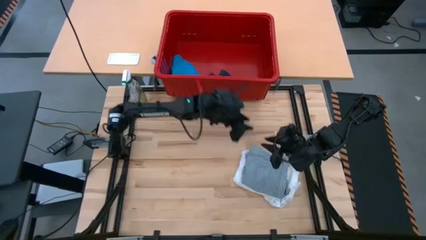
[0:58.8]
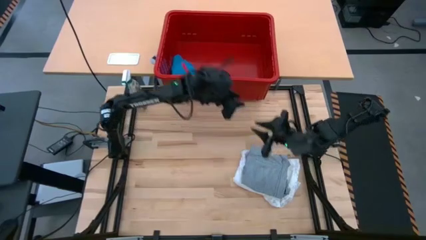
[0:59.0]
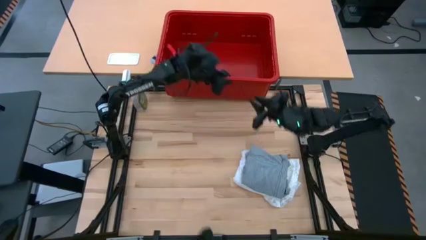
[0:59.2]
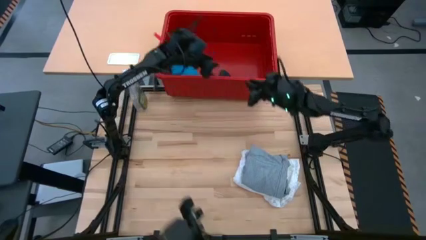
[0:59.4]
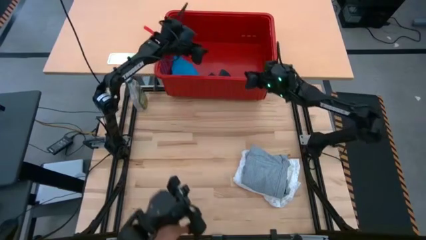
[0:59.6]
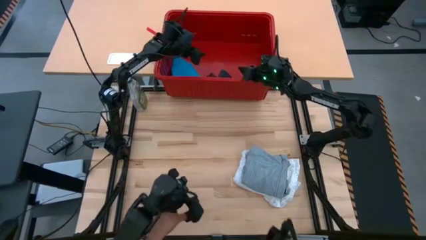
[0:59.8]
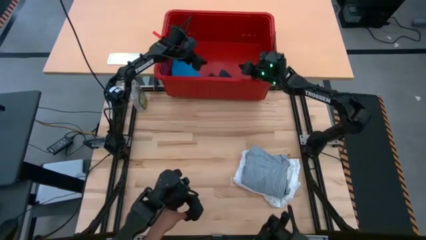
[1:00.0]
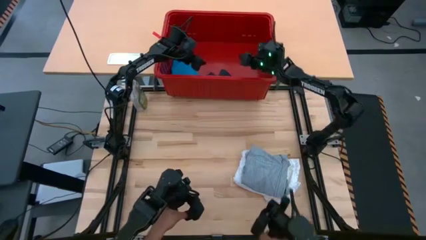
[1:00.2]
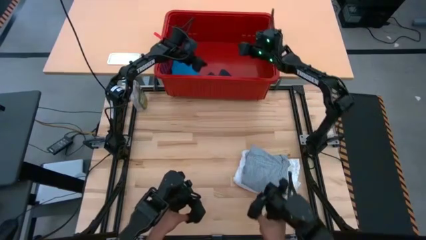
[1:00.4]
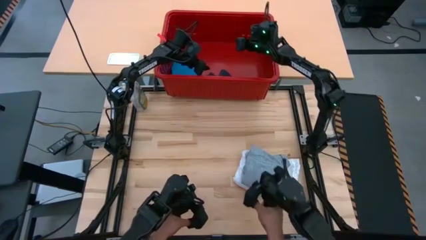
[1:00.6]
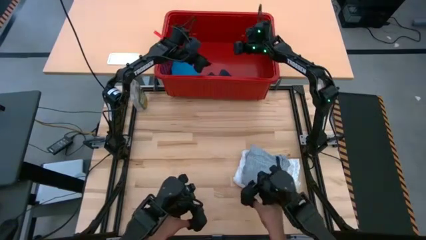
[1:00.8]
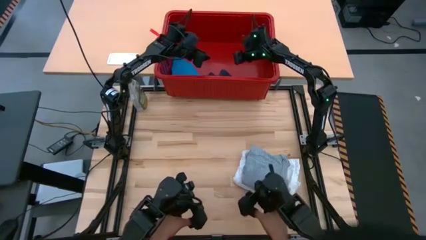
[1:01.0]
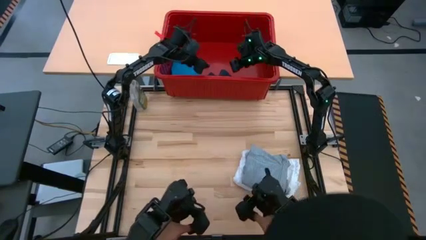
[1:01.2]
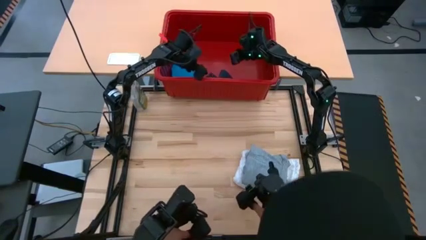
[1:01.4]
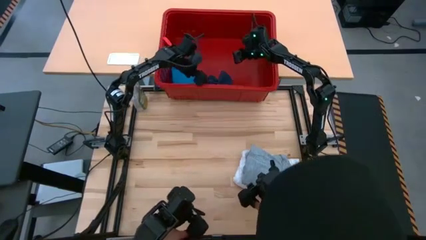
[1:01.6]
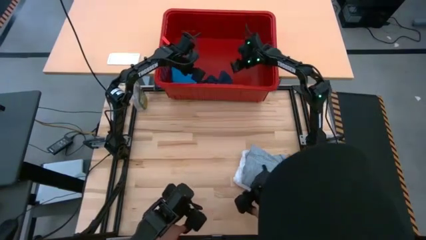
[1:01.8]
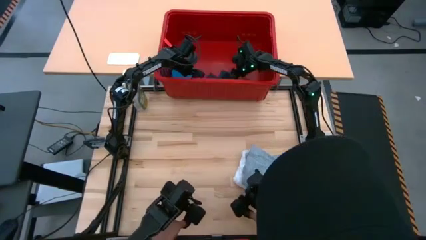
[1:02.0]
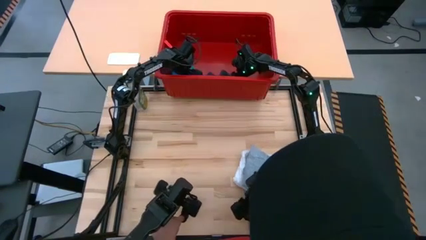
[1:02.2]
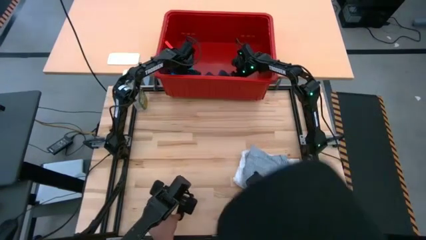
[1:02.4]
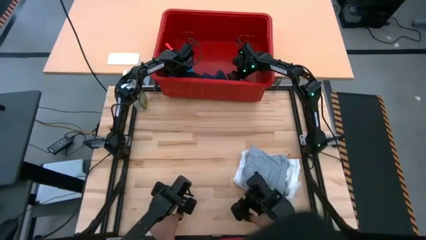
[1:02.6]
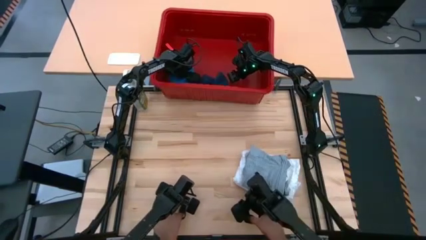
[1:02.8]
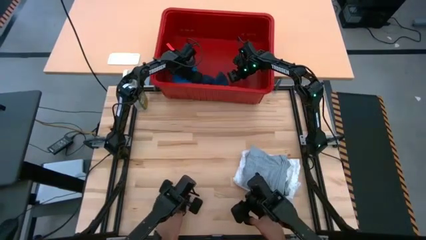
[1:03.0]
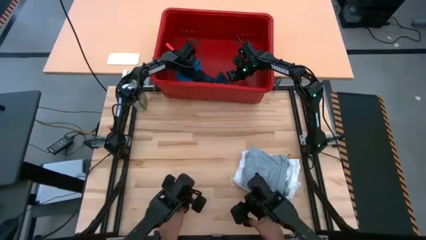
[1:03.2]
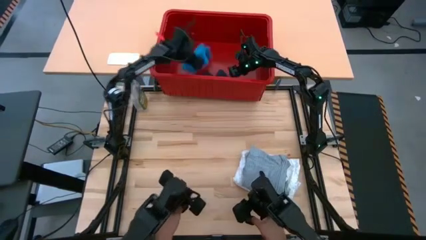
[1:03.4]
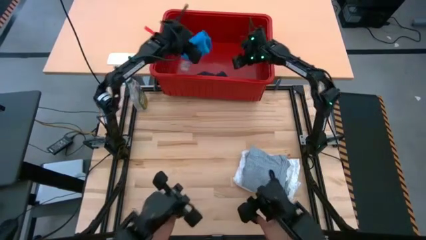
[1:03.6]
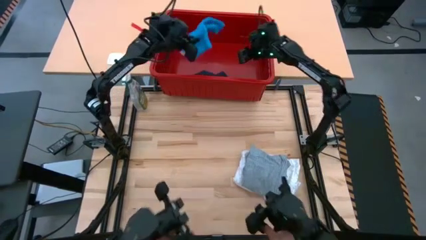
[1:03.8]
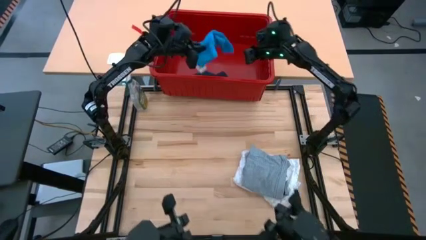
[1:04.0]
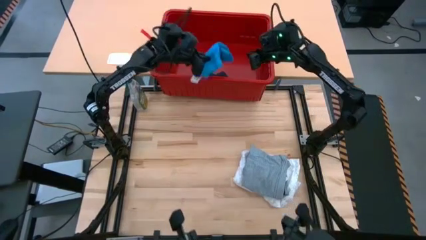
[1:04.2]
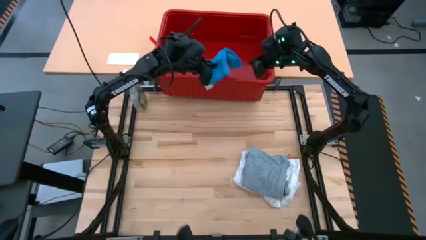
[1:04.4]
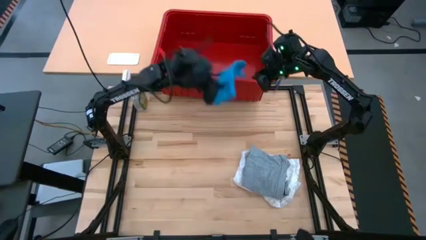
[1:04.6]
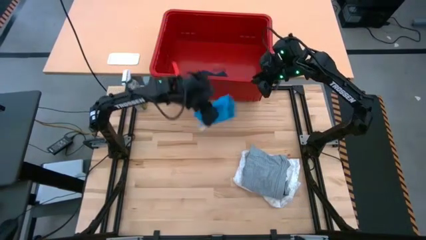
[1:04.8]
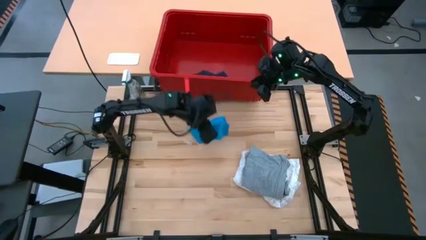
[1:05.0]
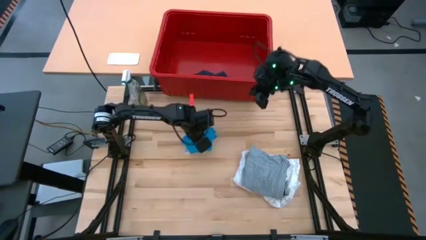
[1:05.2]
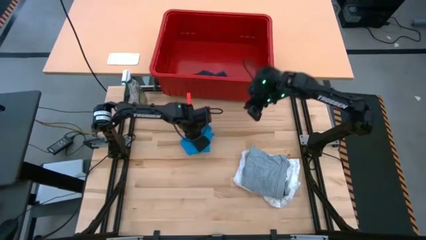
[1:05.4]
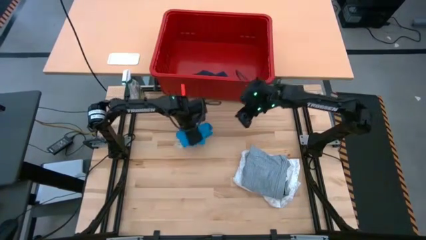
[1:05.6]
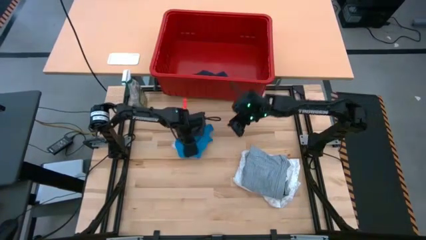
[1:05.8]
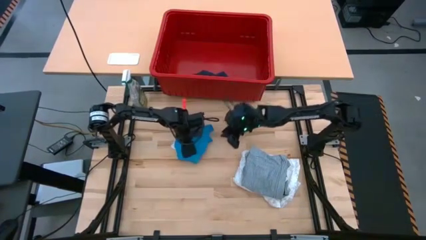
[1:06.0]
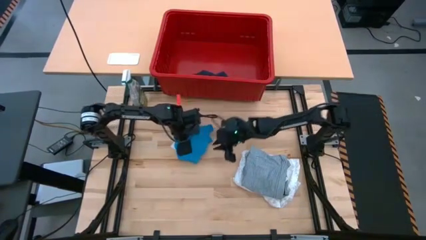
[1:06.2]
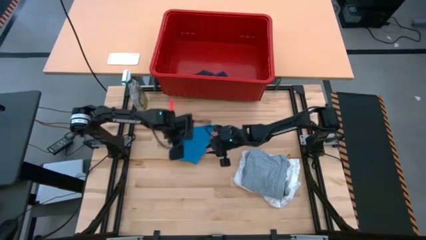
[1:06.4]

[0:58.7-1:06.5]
Task: Fold laundry
Remove the light blue shorts from the red laundry bin

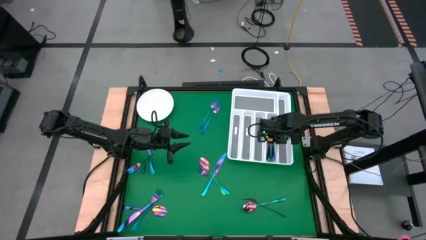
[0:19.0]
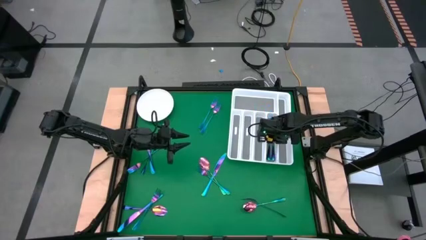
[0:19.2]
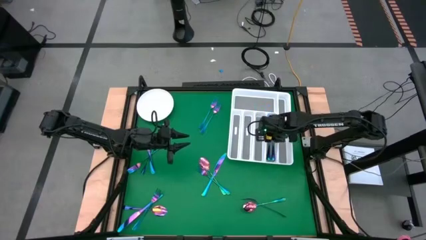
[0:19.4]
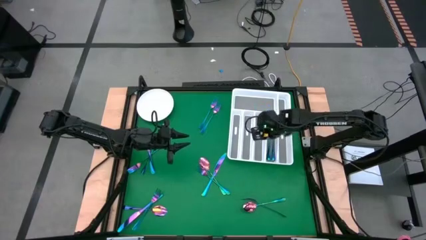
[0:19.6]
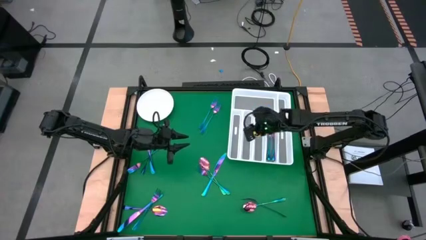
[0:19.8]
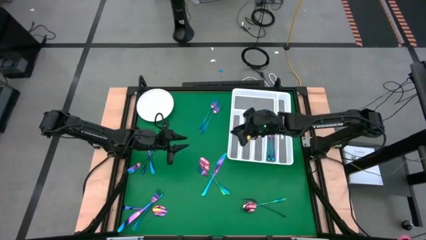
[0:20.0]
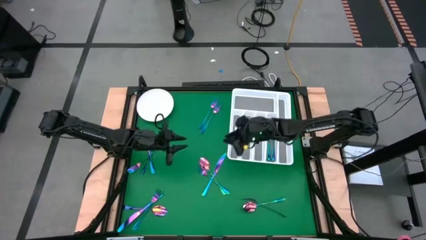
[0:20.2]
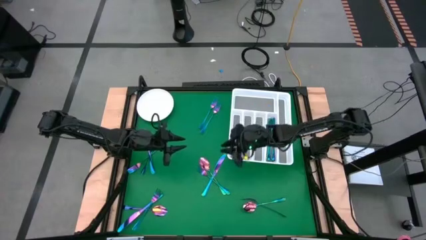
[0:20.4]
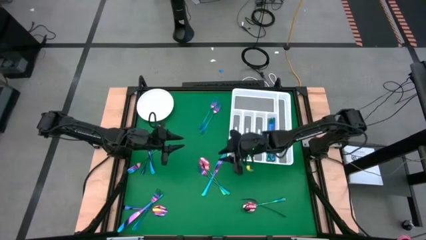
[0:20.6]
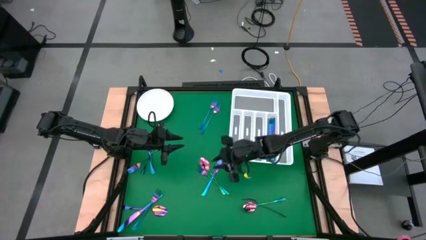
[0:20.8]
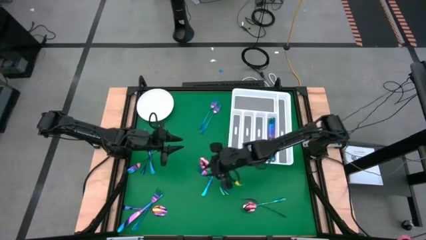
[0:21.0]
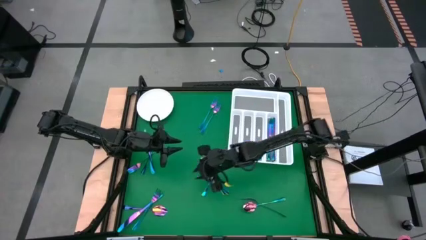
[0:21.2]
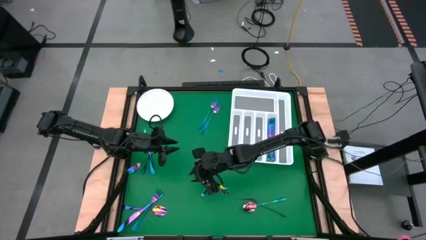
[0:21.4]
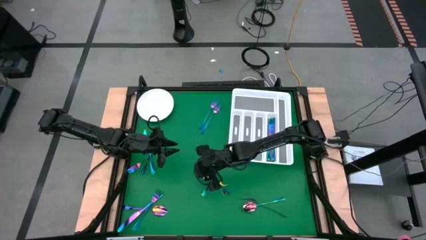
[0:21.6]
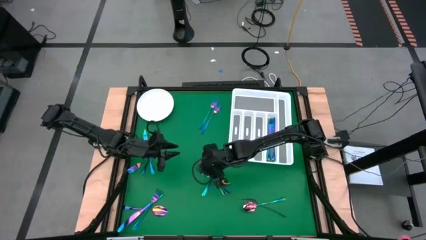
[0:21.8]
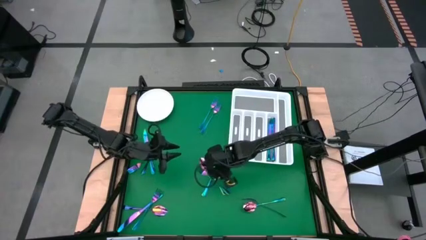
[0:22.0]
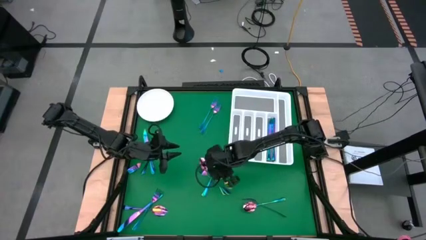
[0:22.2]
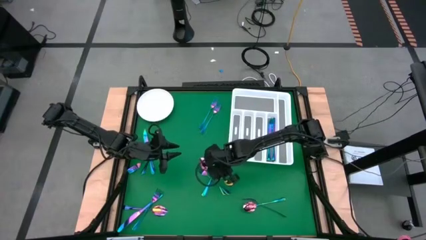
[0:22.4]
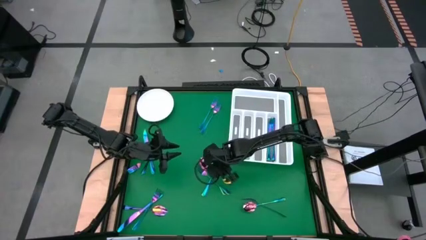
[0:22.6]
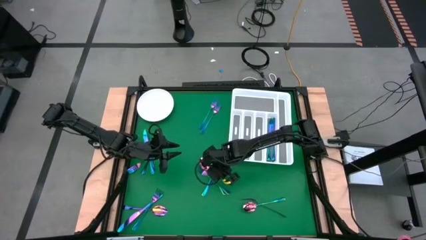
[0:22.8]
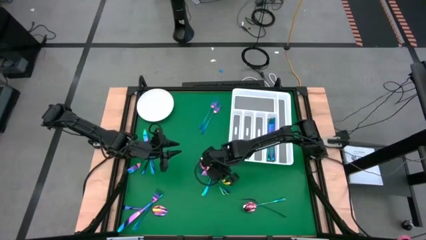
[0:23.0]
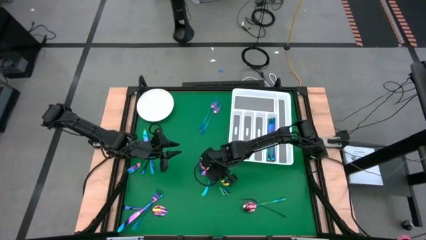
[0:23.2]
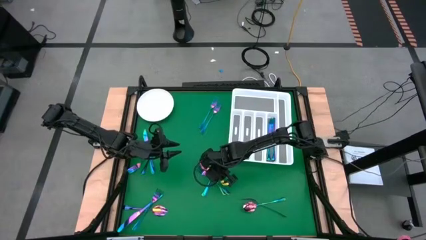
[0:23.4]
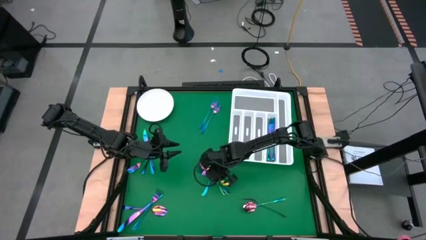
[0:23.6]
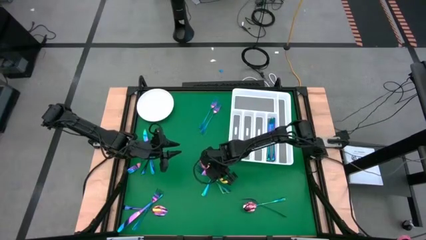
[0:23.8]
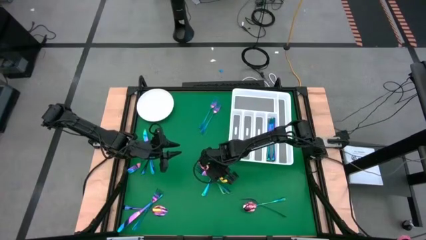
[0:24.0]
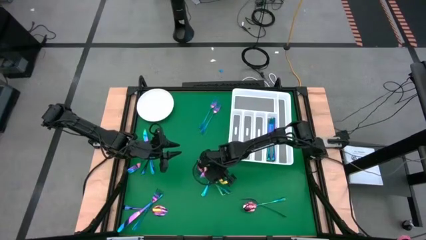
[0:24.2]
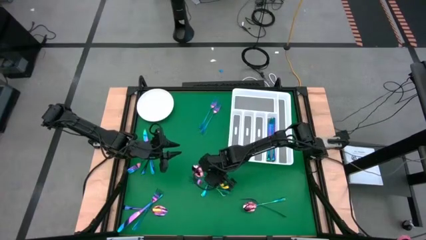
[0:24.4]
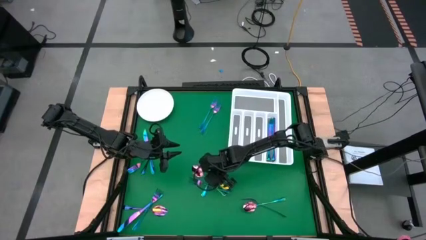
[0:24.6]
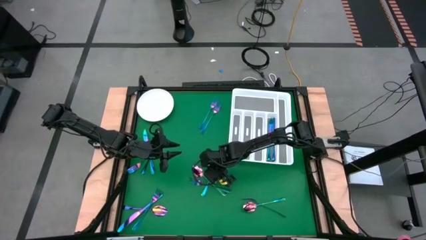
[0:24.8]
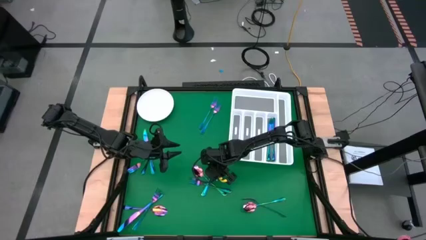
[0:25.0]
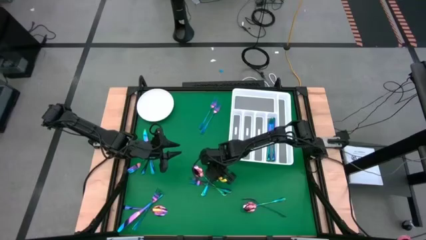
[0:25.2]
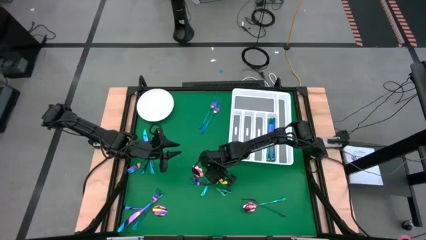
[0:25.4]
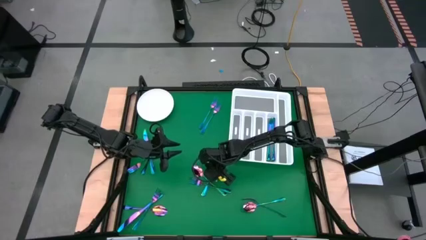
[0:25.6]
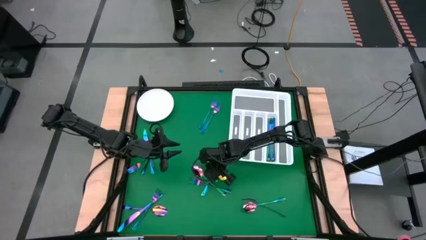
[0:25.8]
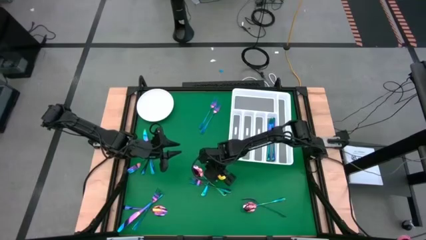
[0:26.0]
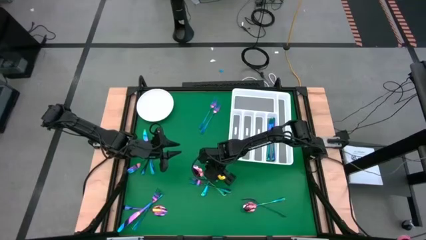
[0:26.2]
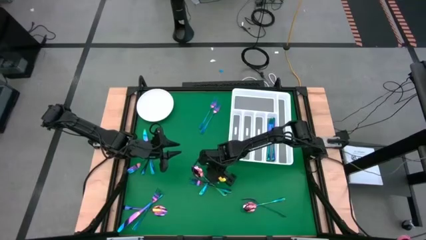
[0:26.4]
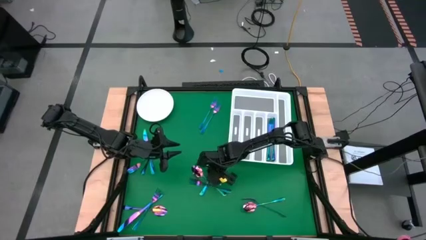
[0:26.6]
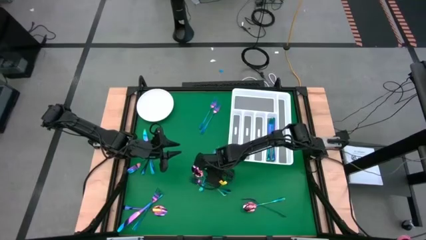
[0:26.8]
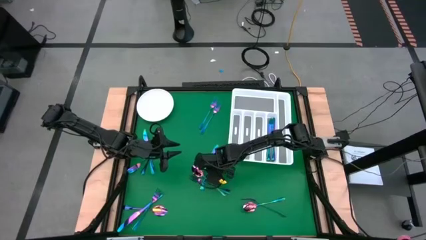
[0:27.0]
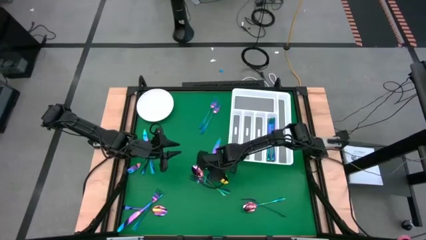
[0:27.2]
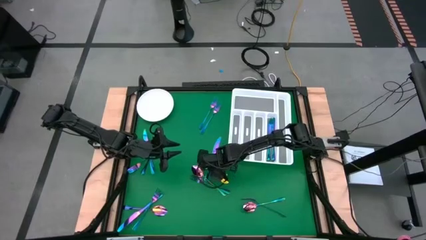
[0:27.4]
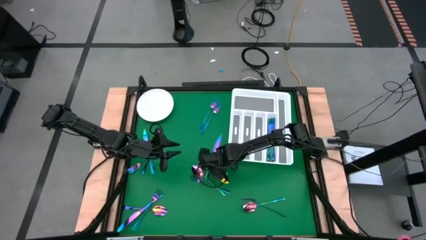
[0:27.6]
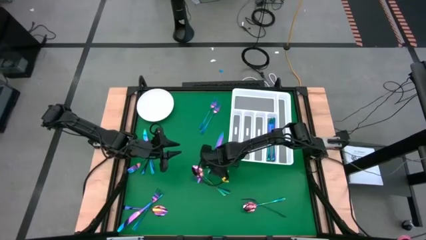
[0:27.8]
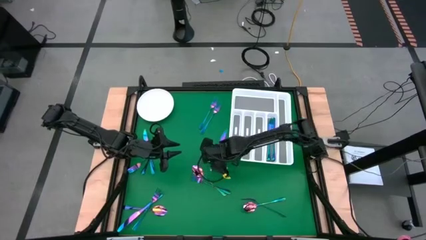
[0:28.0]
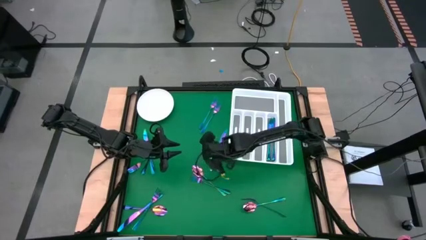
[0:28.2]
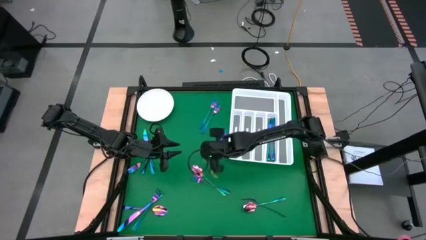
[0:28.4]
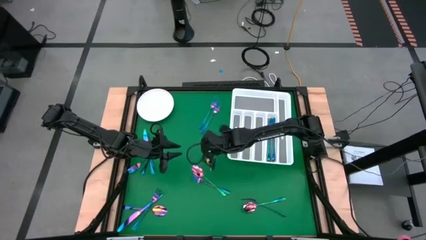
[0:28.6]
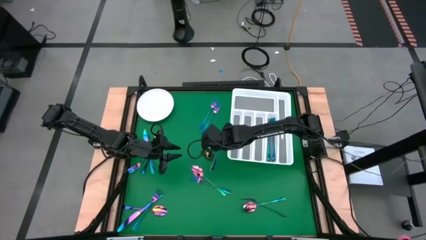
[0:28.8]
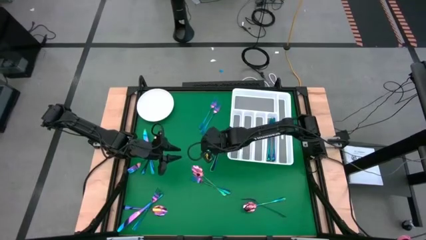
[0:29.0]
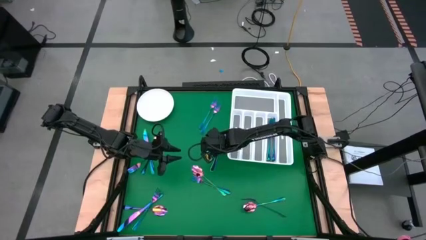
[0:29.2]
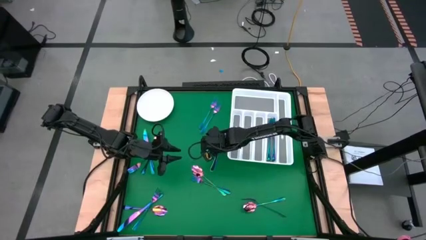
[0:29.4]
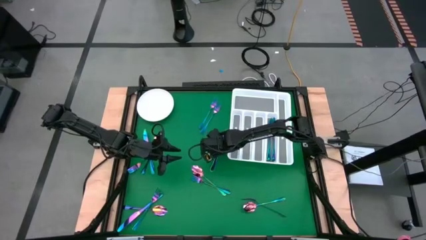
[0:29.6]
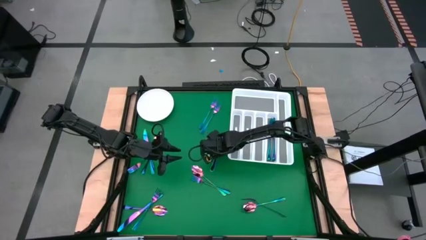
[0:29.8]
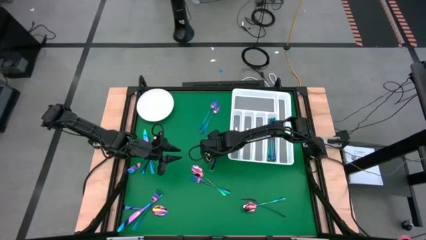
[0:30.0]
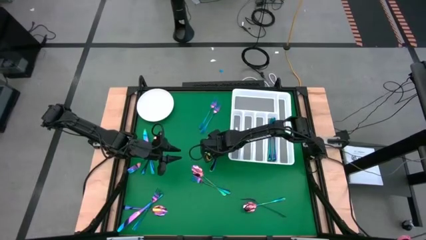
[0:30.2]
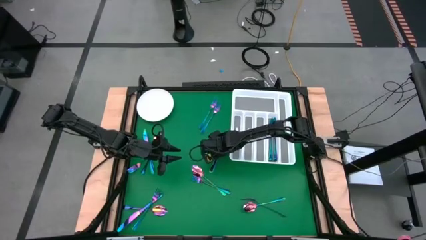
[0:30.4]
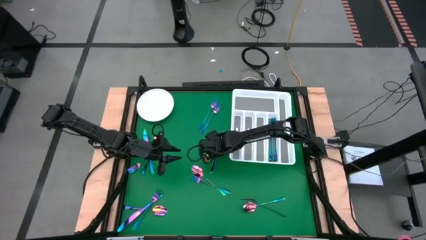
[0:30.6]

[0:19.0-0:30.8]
Task: Sort silverware
Put the blue knife into the white cutlery tray
